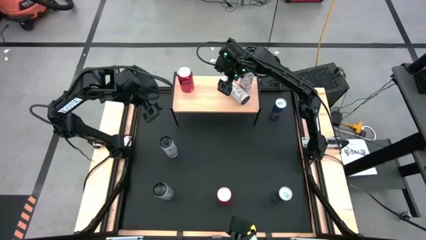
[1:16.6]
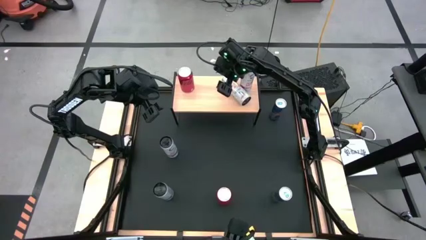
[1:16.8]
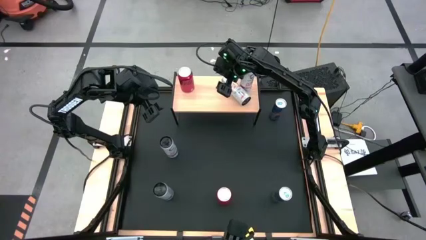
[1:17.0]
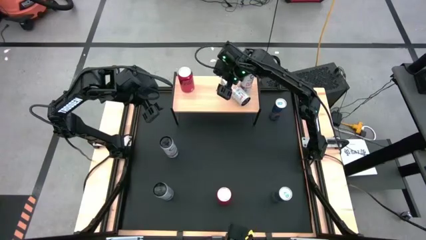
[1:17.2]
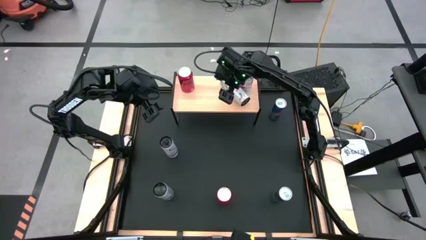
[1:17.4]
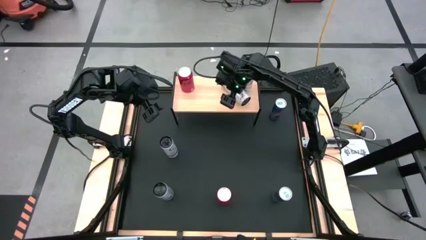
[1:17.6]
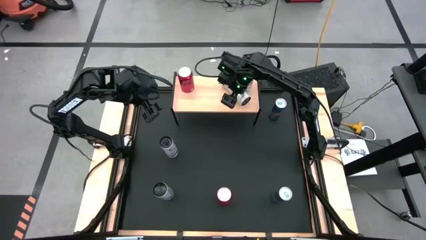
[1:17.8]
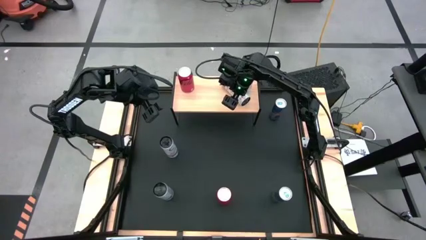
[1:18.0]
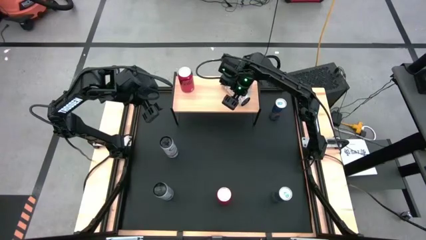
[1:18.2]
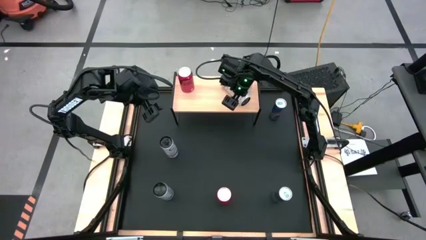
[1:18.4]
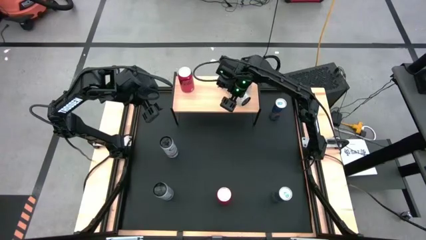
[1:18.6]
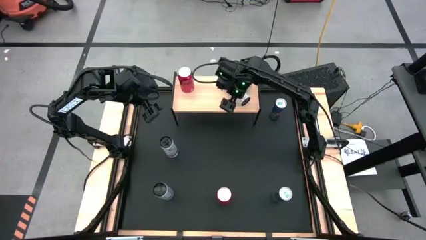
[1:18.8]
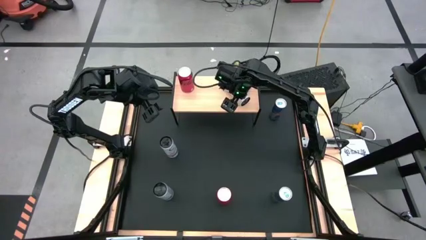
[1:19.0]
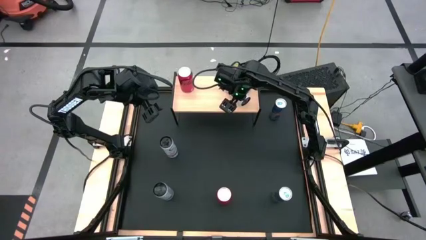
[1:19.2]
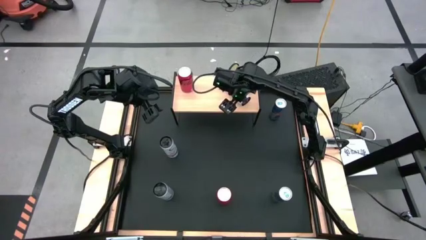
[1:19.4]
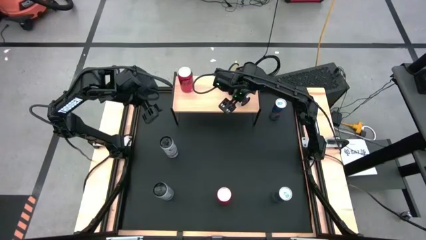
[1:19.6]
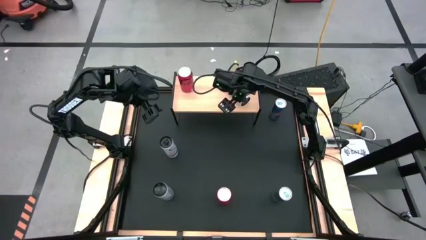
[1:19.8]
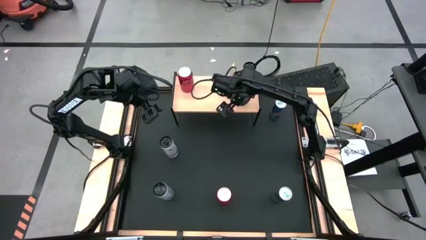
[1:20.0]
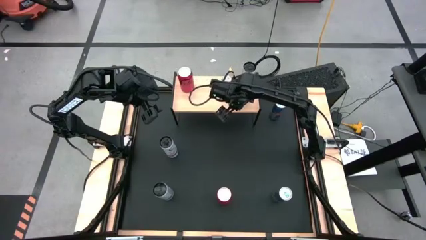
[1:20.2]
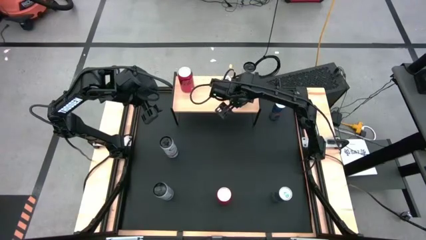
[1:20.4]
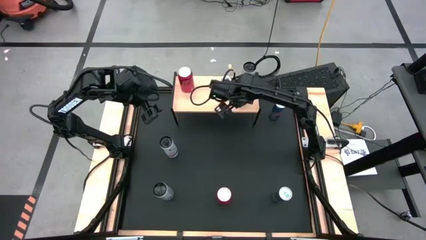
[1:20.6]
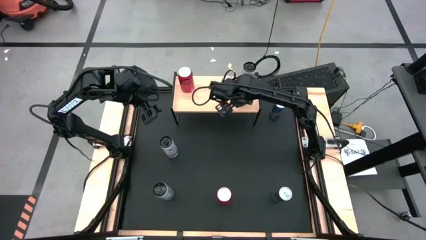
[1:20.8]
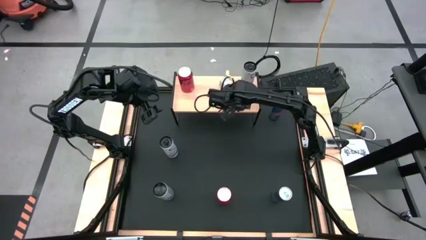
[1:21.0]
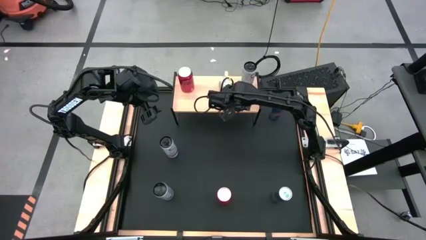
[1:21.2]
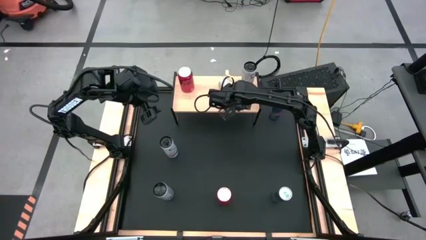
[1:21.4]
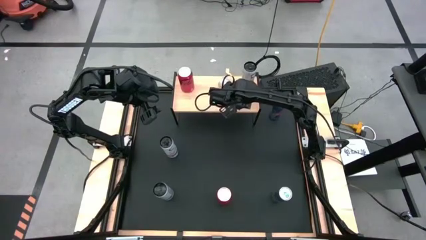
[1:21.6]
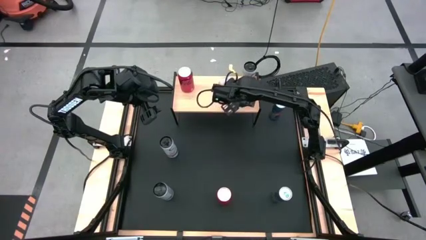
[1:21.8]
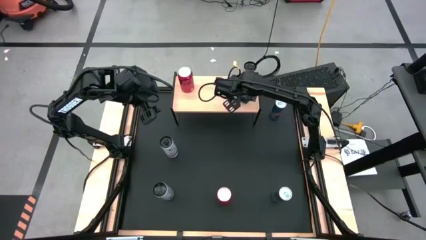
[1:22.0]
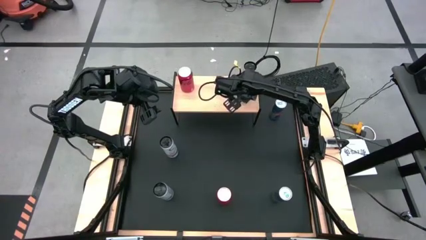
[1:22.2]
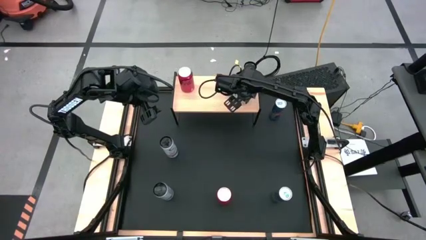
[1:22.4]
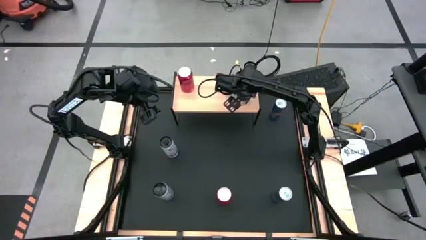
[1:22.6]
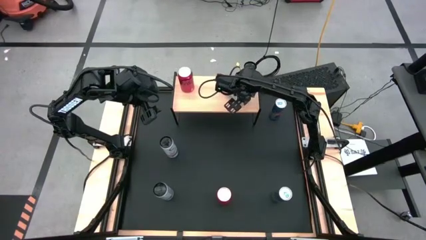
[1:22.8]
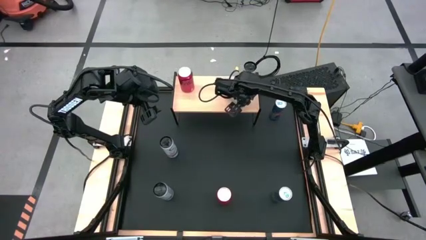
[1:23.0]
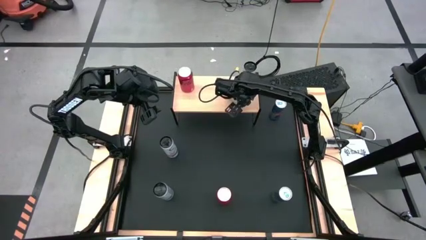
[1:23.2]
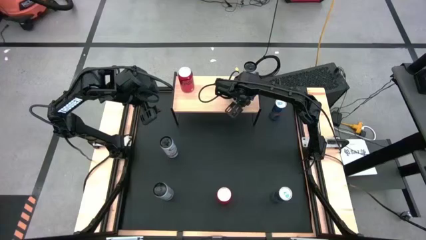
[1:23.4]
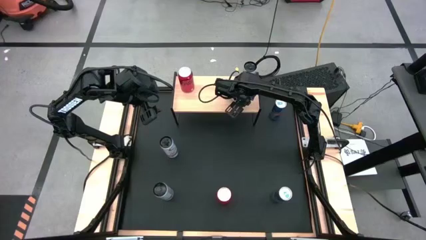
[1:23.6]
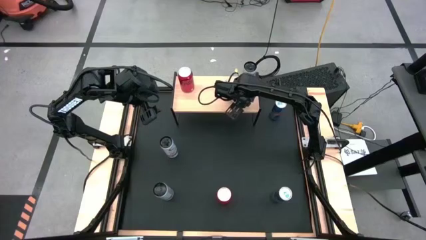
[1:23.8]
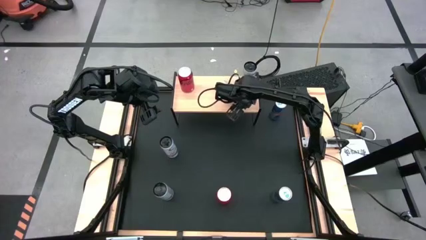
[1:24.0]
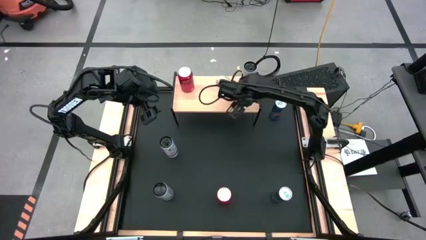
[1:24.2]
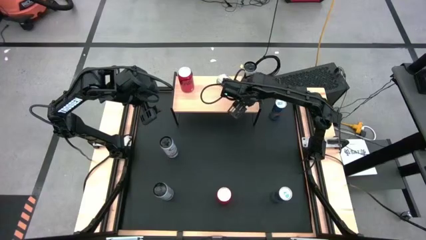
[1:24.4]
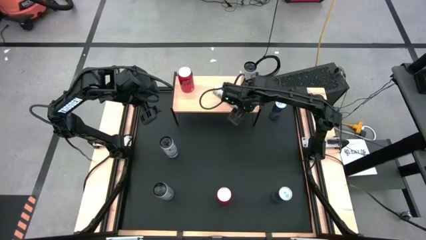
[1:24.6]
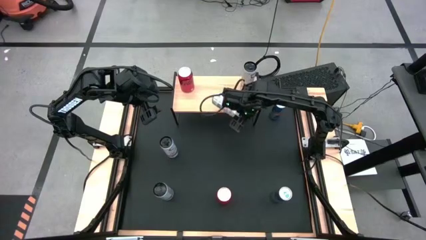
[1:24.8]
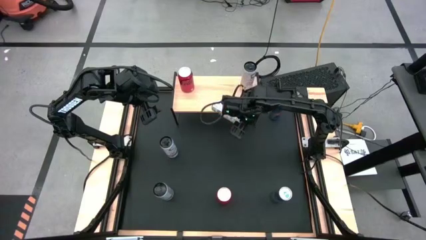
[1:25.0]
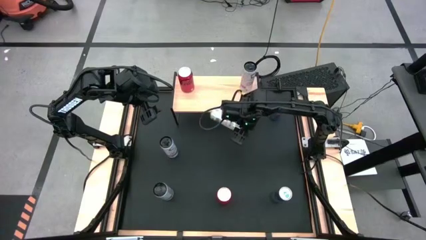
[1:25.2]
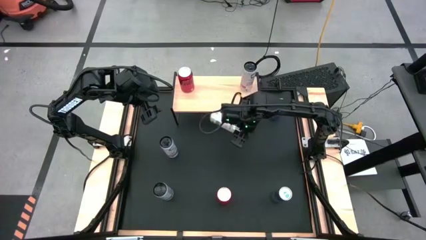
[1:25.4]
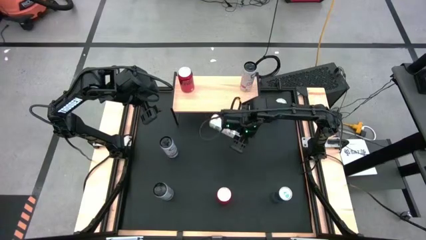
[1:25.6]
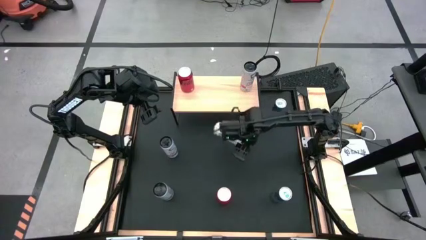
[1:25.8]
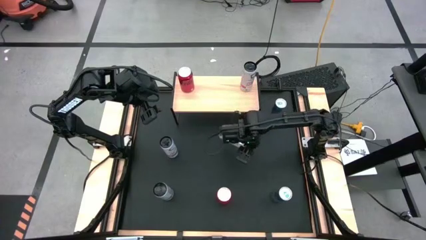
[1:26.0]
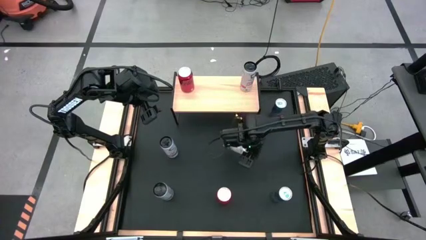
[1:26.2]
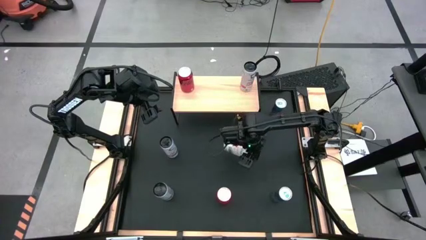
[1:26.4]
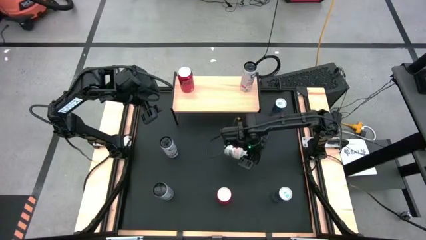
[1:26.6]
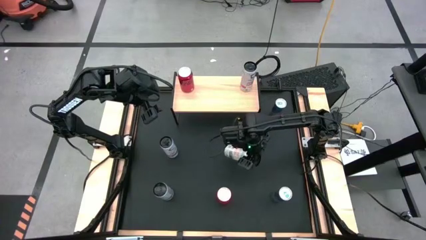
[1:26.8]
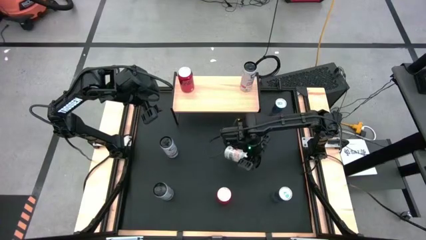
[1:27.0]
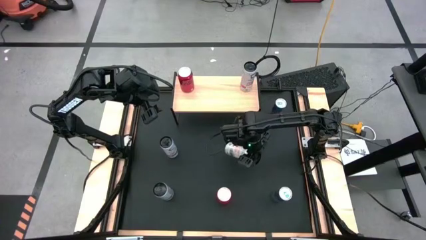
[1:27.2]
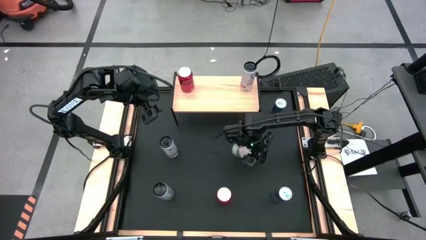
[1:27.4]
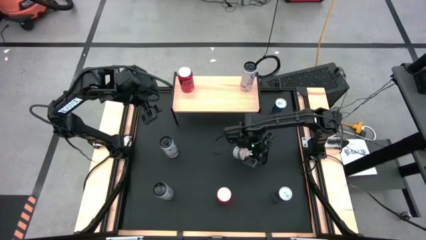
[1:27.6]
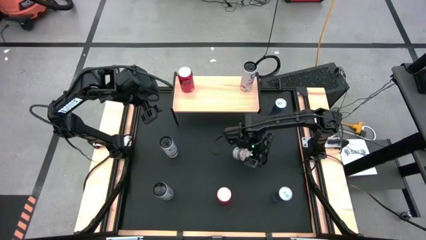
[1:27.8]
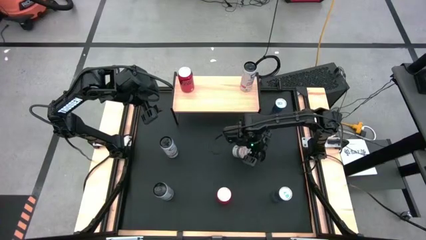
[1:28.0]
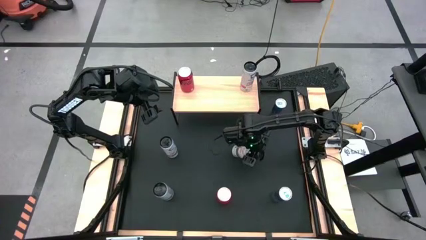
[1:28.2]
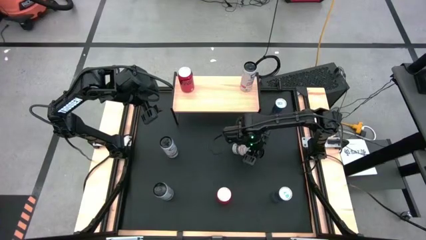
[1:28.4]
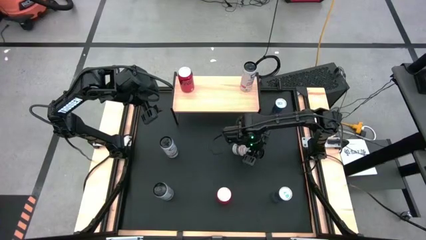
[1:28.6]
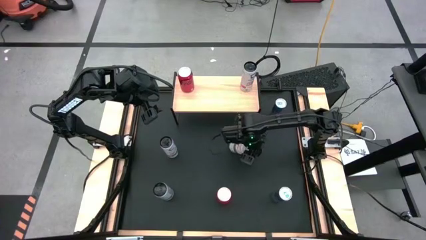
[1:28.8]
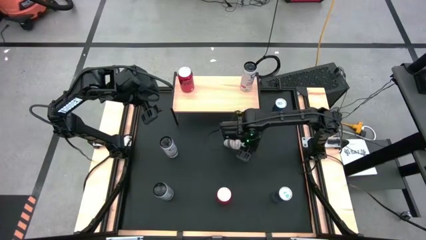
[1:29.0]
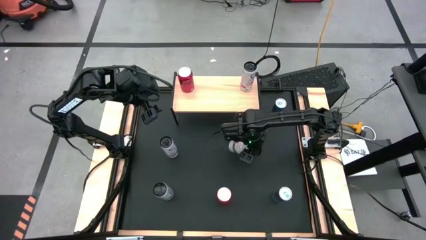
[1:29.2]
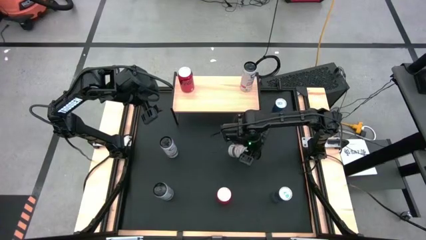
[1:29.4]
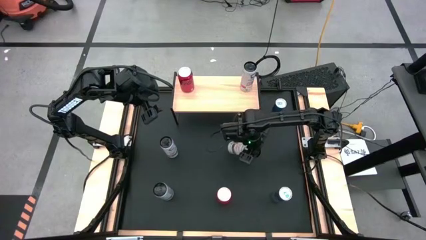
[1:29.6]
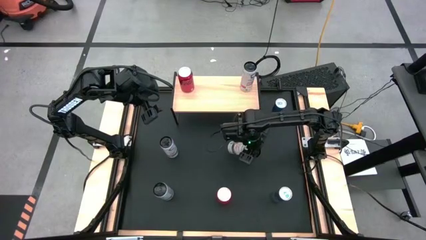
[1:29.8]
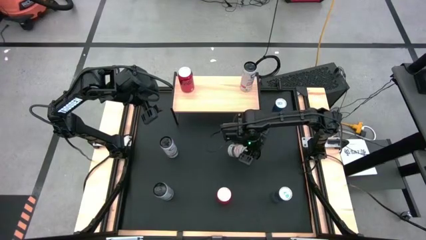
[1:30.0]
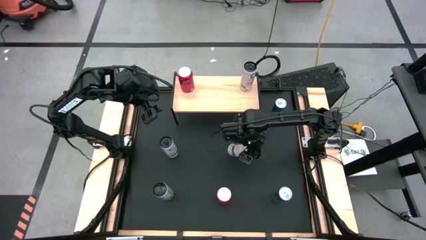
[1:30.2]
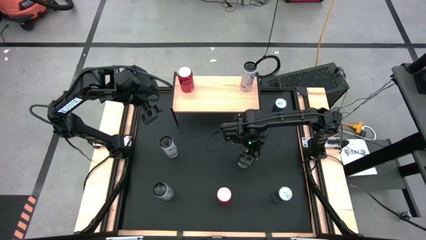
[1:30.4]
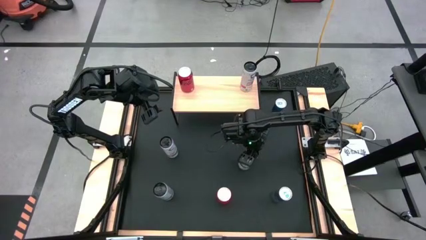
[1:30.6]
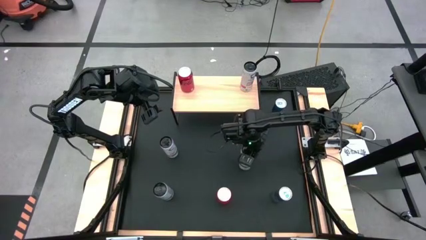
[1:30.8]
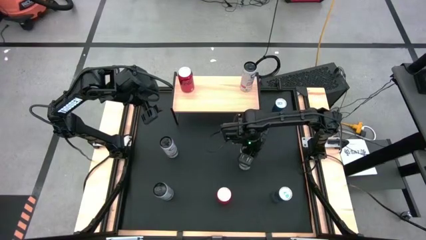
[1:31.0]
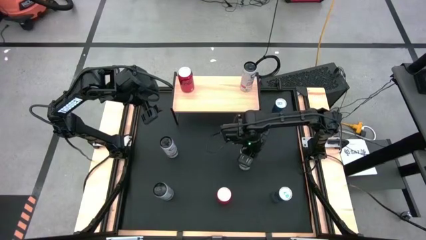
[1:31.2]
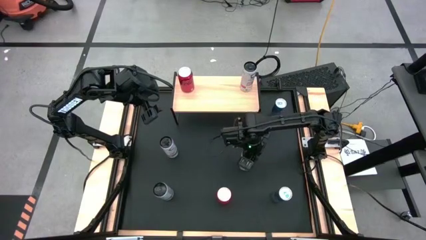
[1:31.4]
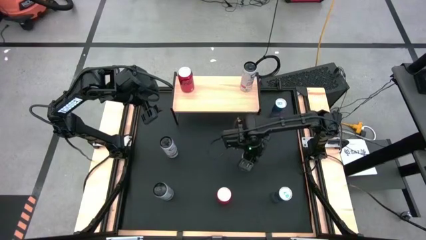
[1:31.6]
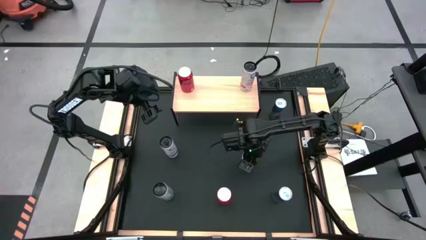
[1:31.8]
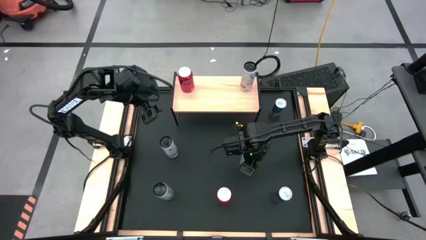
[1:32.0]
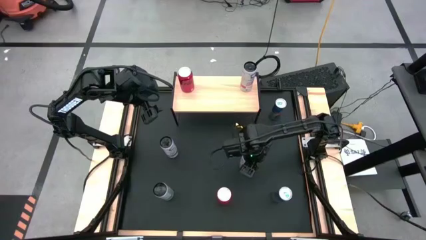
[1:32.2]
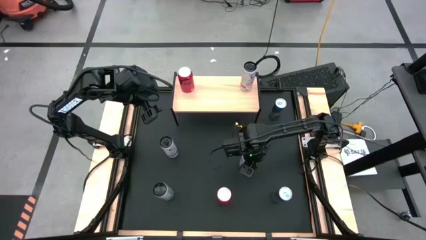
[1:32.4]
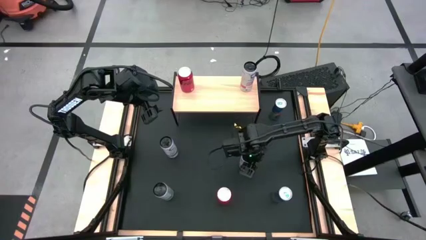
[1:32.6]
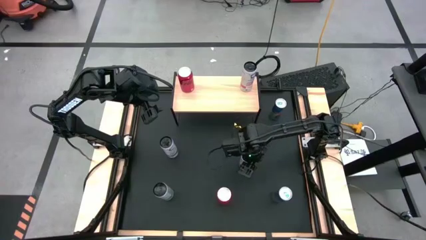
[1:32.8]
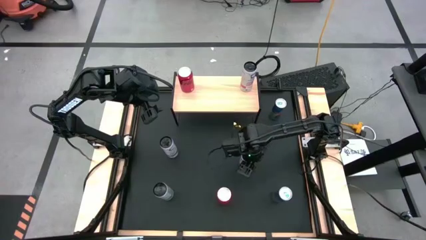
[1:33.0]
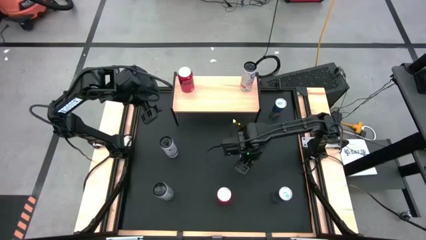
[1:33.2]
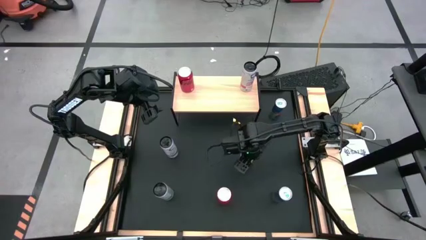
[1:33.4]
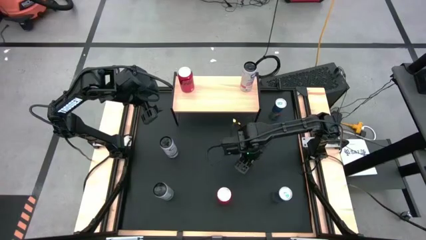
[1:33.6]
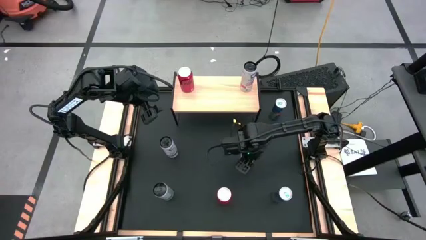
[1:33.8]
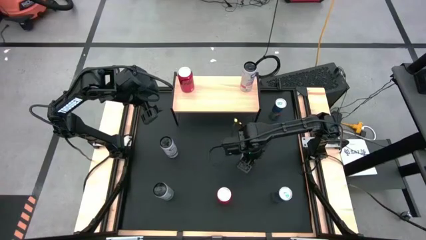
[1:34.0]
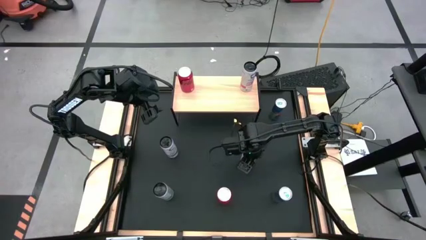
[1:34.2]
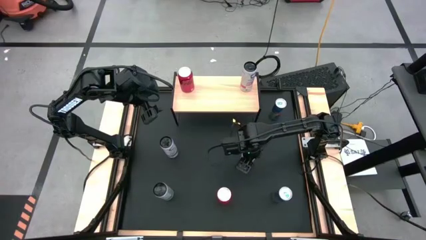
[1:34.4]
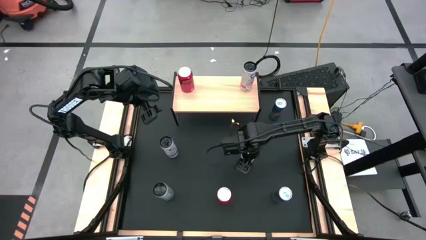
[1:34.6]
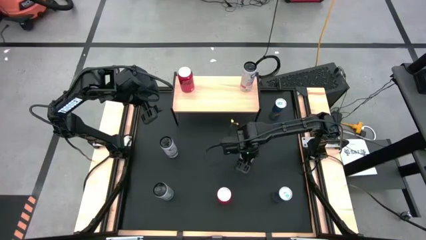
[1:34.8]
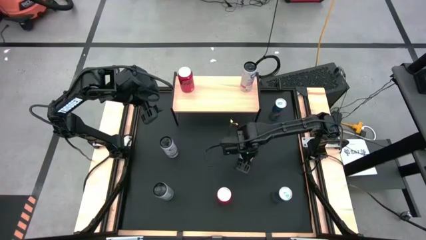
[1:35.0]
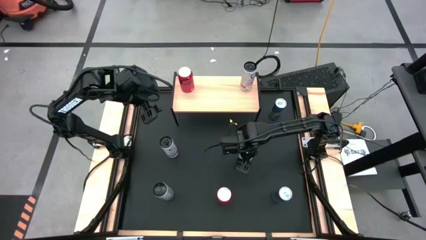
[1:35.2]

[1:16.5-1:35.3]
Task: Place canned beverage on shelf
Put the top white yellow soda can on the shelf
